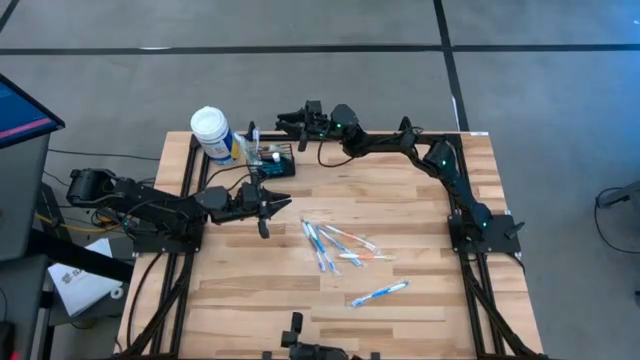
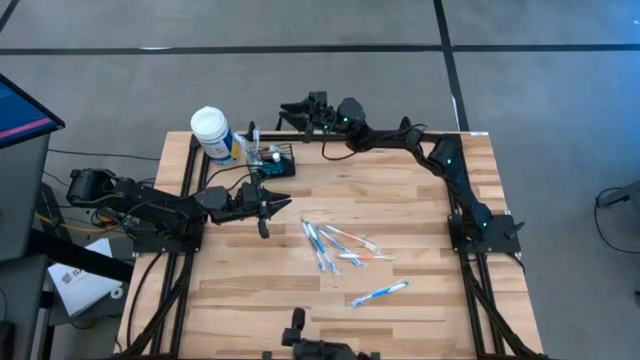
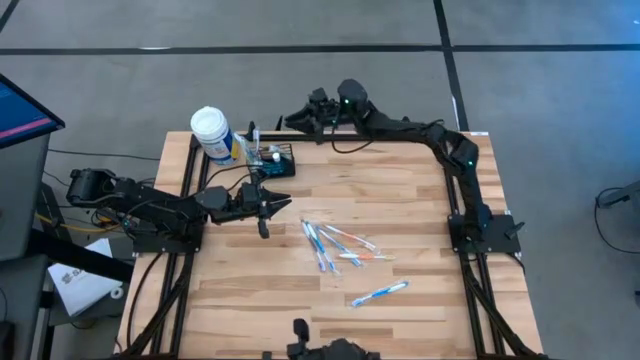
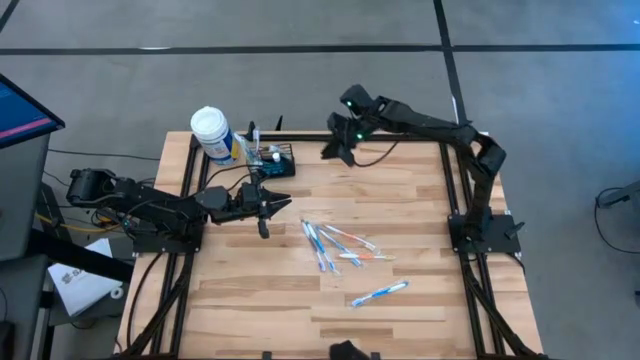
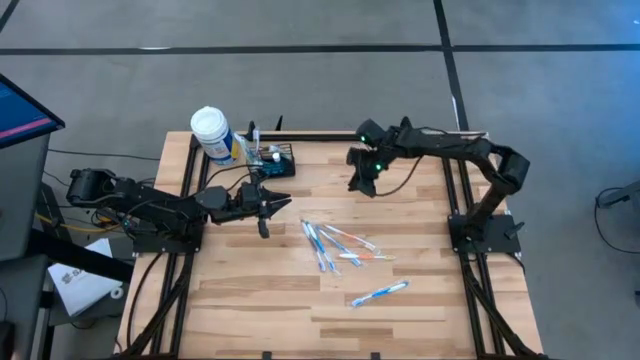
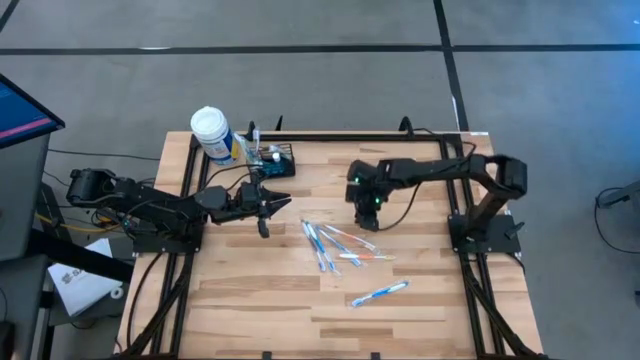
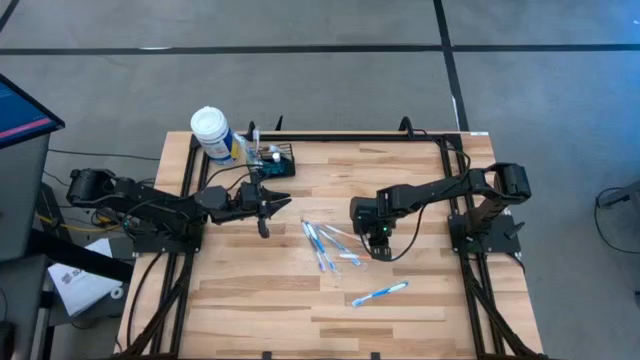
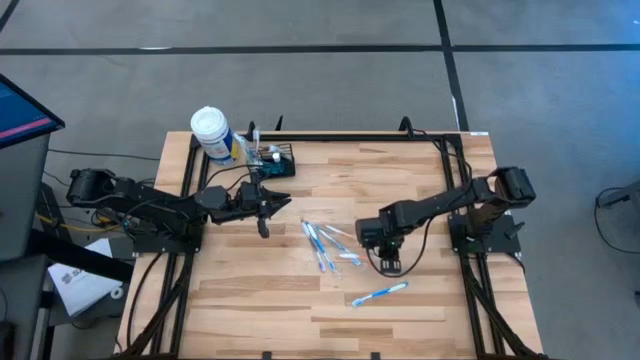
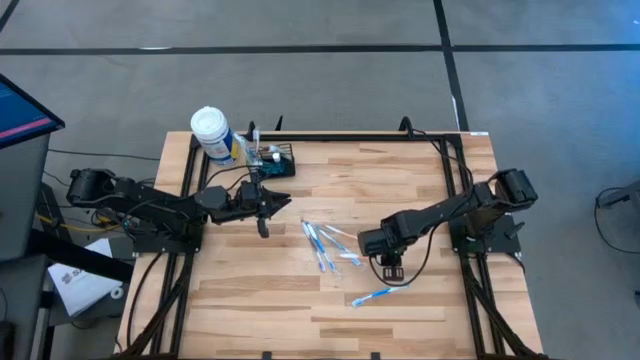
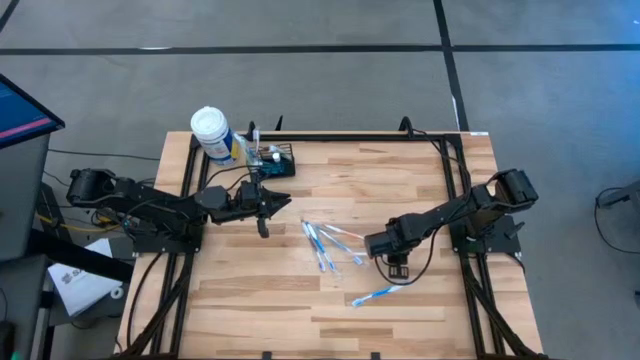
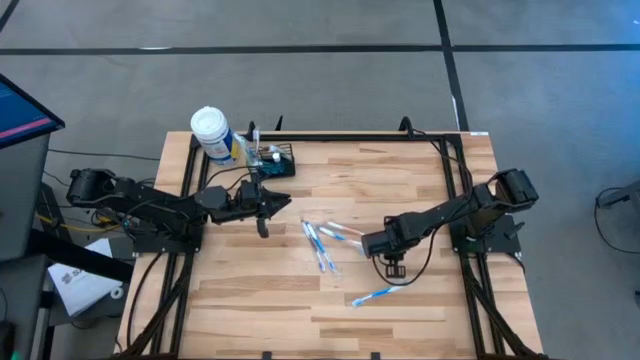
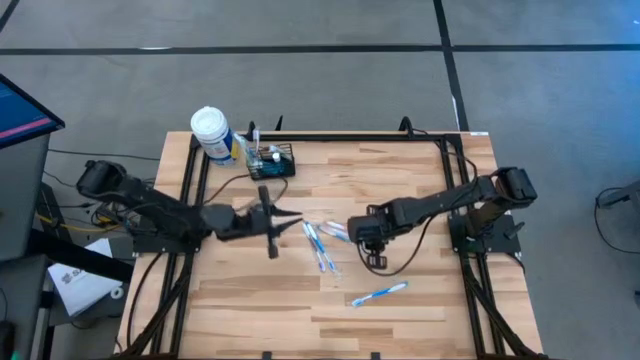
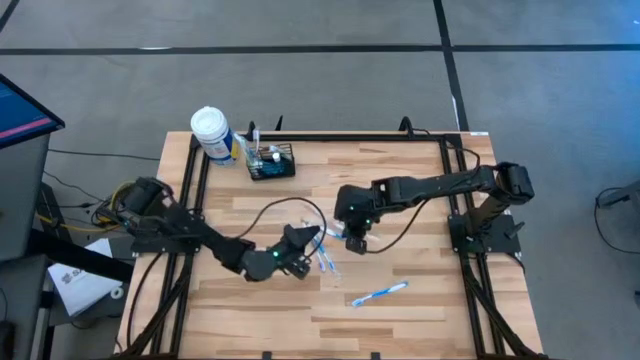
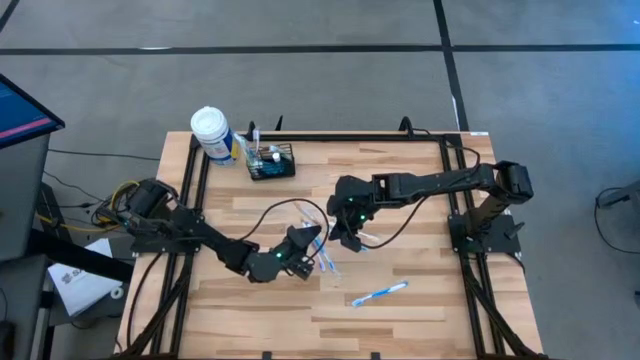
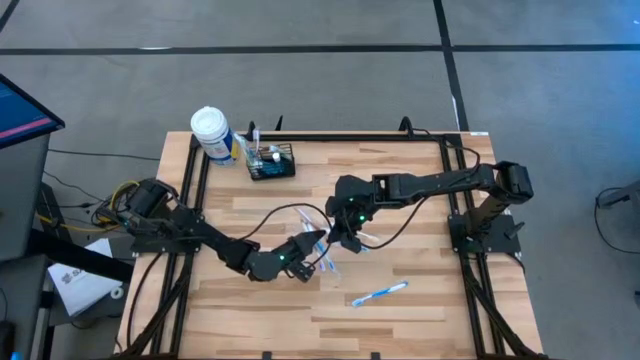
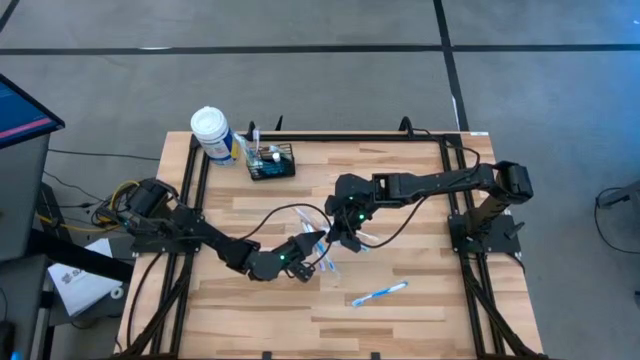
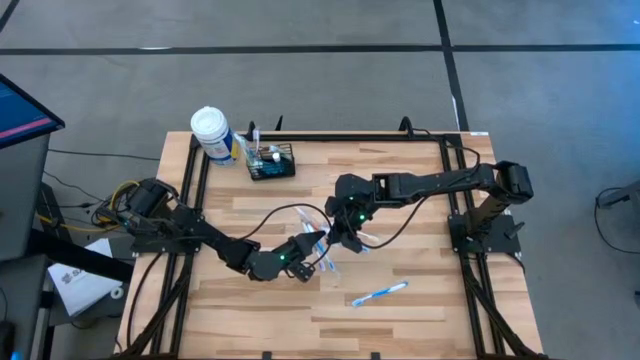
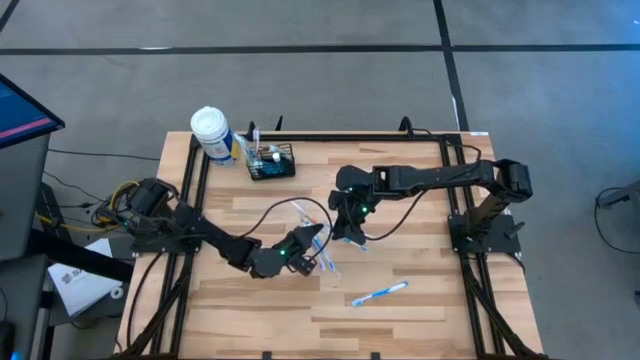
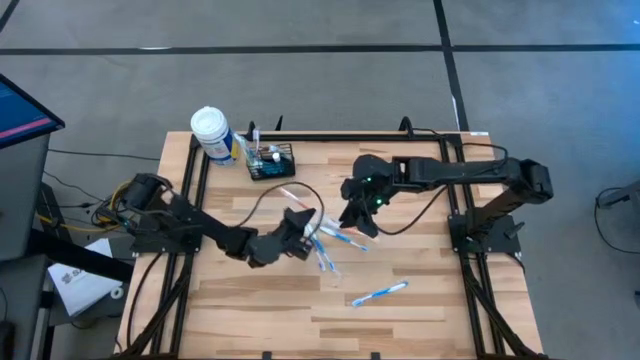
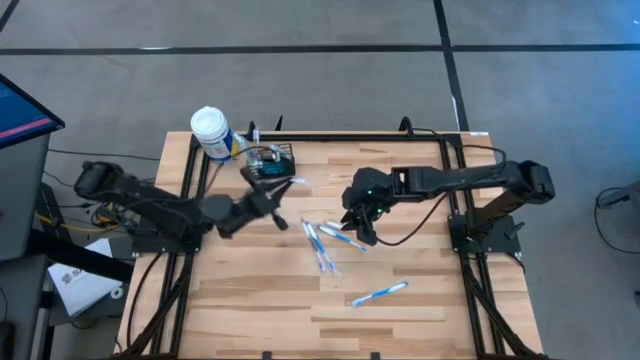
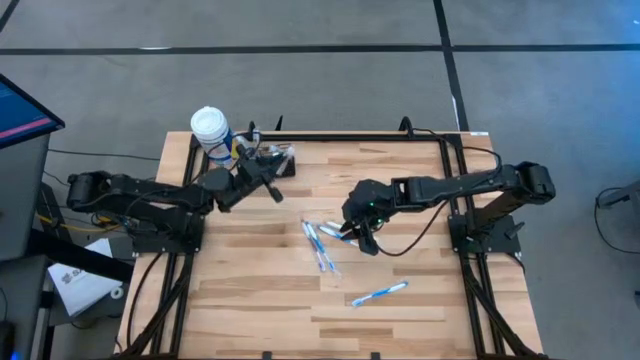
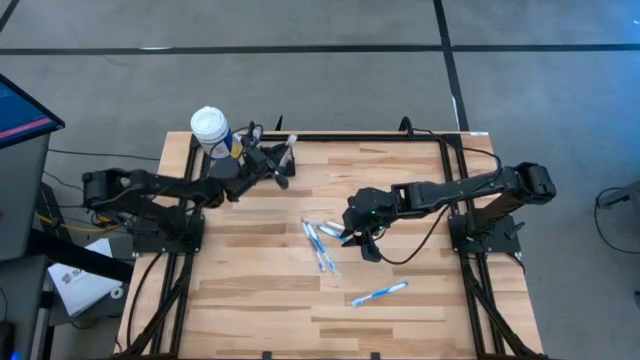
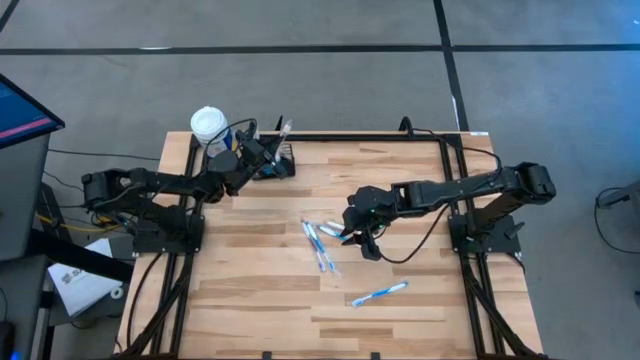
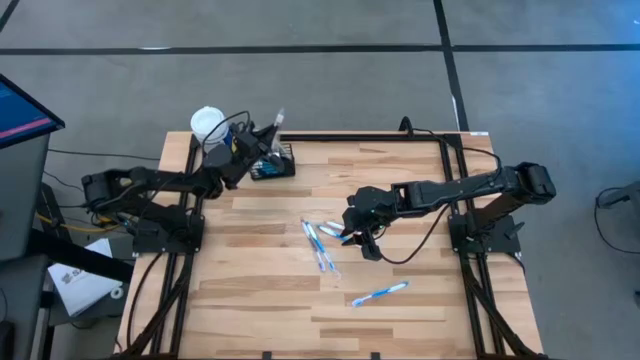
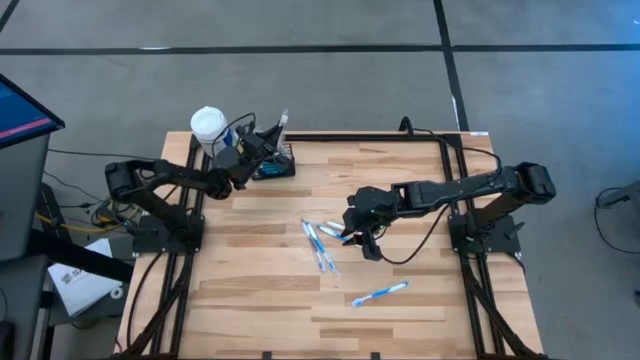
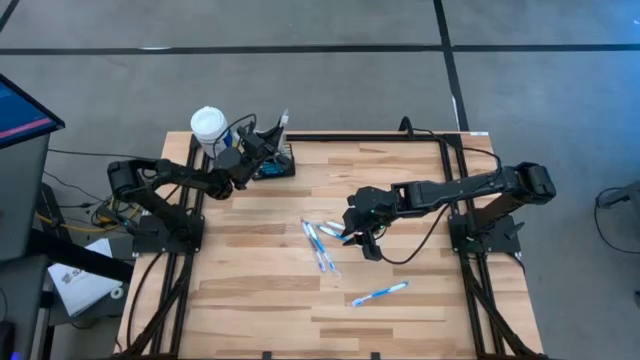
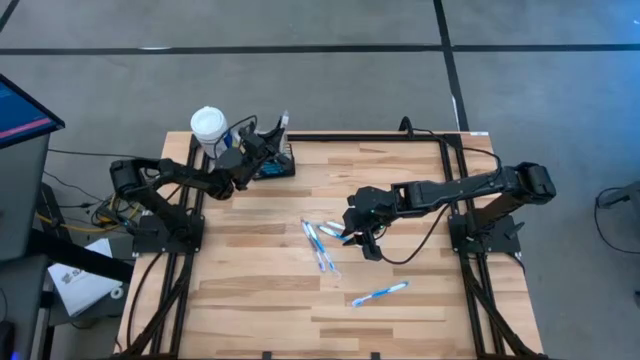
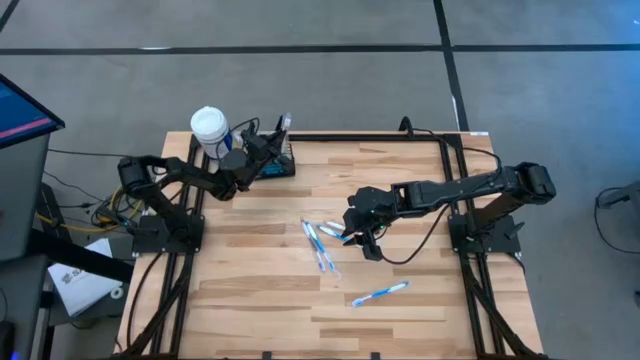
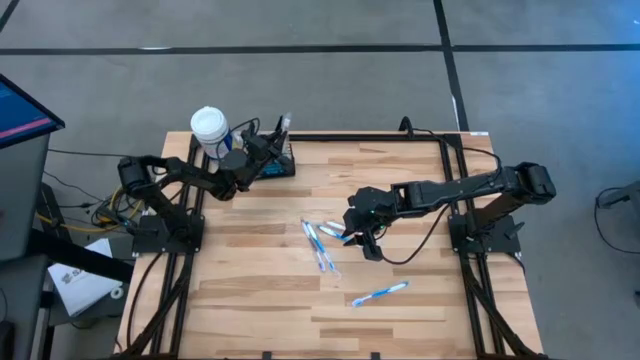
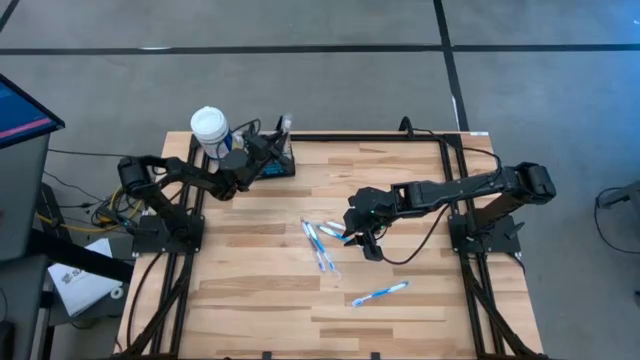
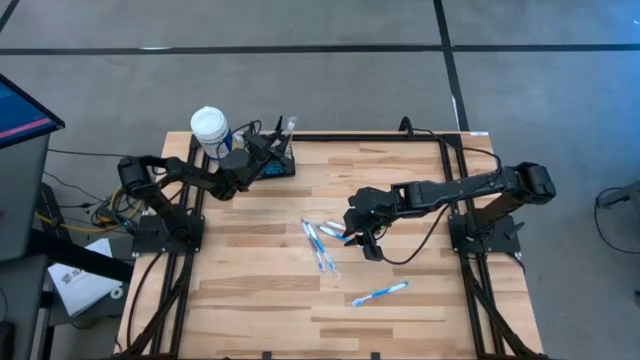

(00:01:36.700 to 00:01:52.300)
Task: Pick & Place toothbrushing station
Put the bottom orange toothbrush into the black wire organizer

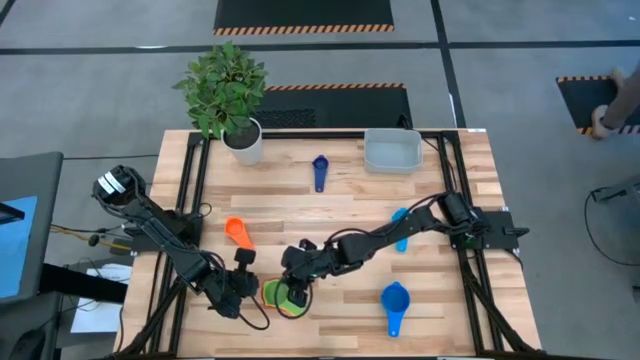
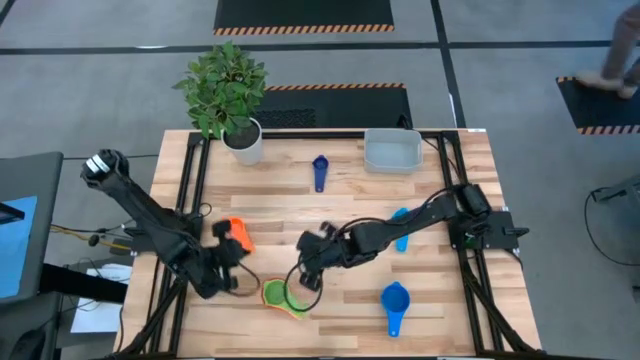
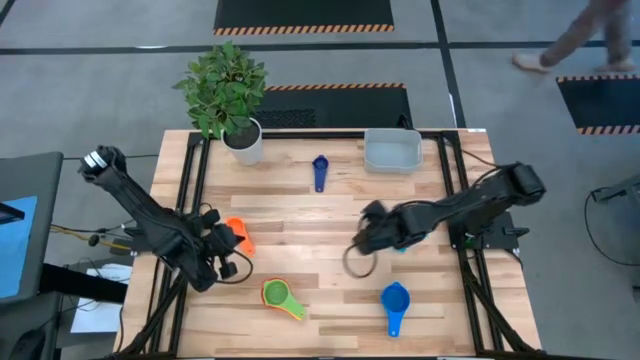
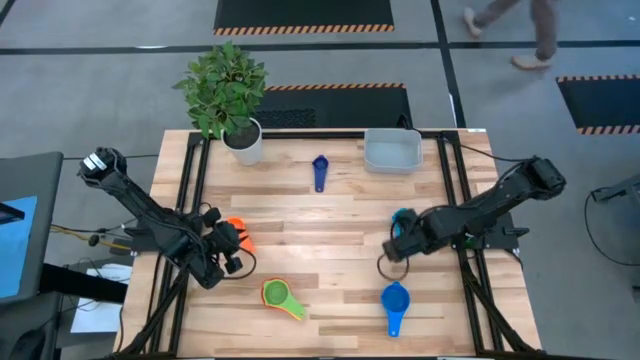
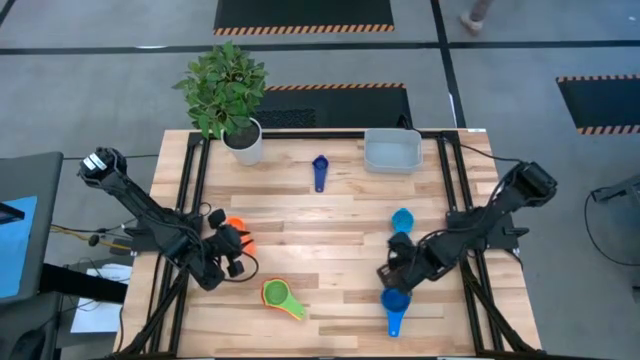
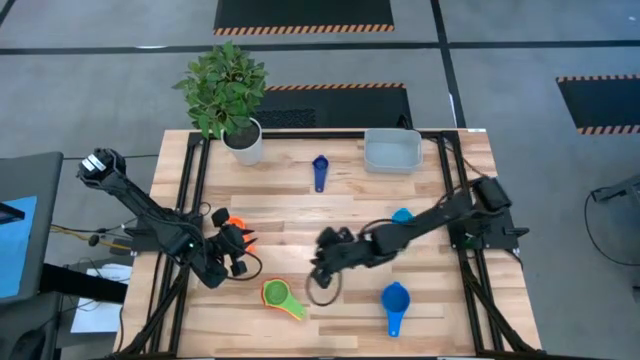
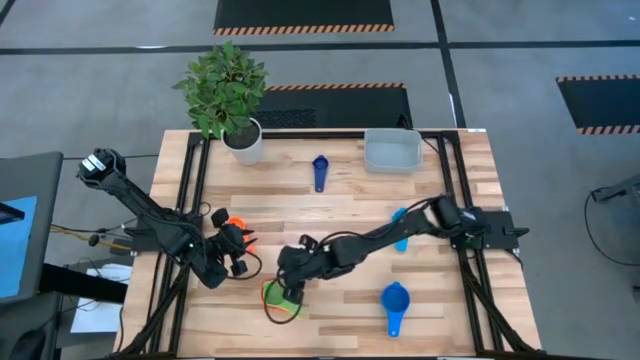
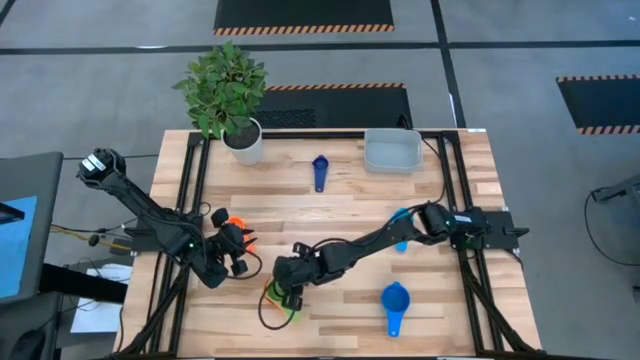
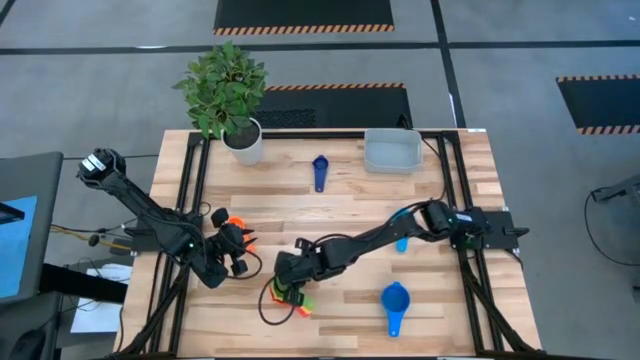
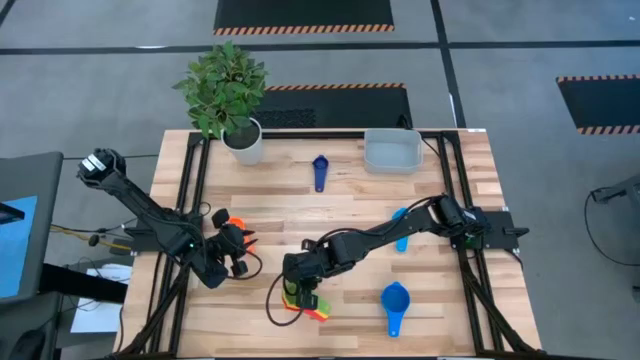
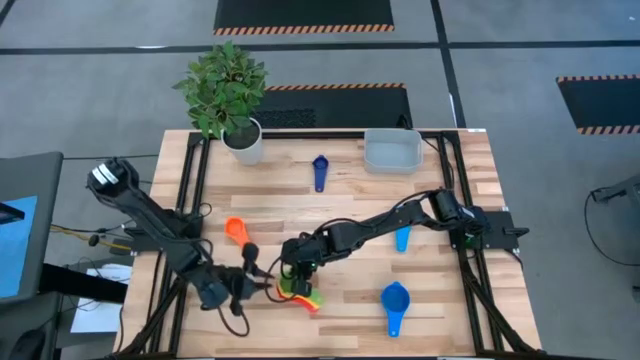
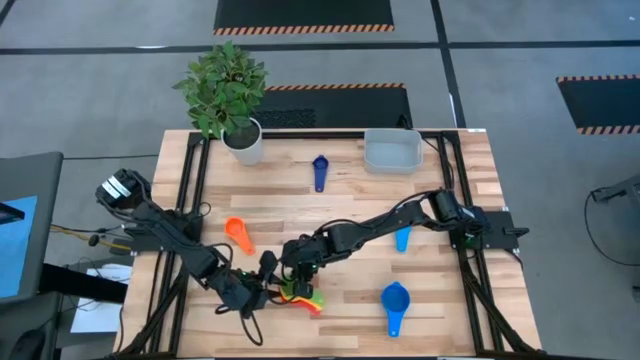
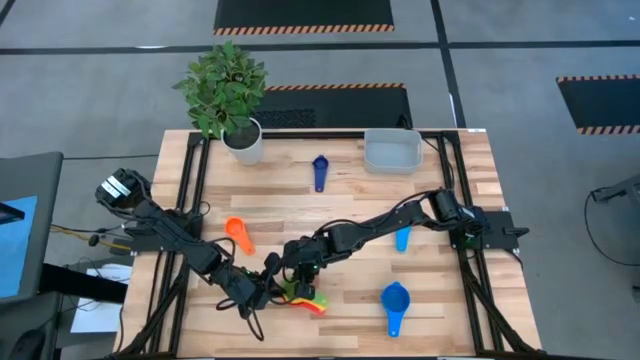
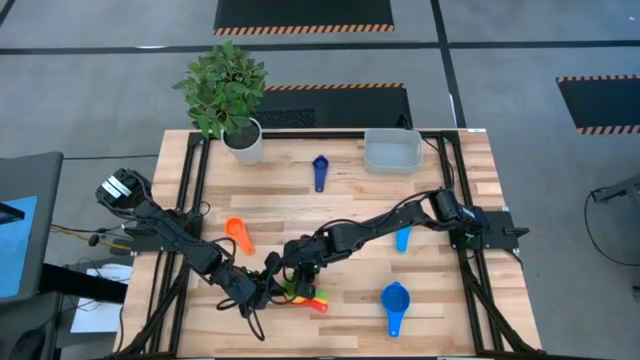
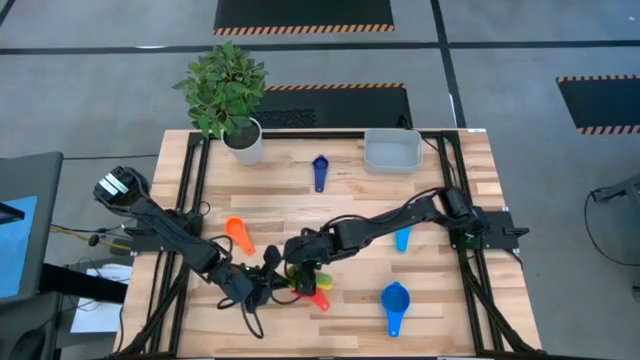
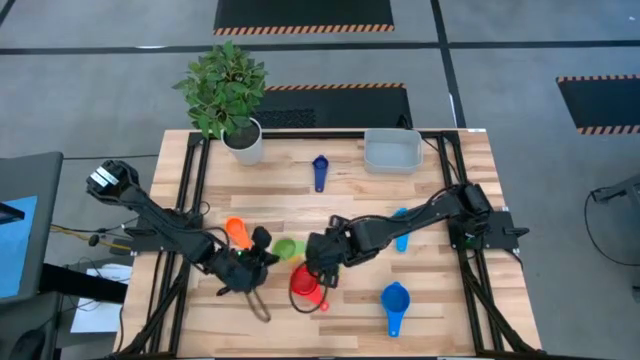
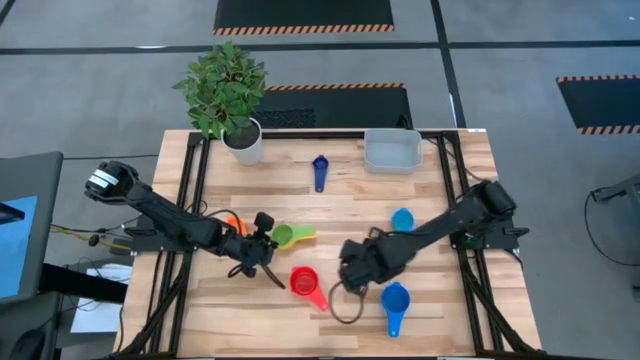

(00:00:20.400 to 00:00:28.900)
Task: Nest measuring cups in basket
Remove the stacked measuring cups from the red measuring cup
